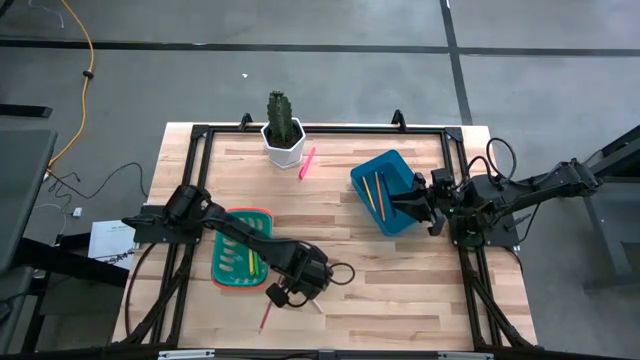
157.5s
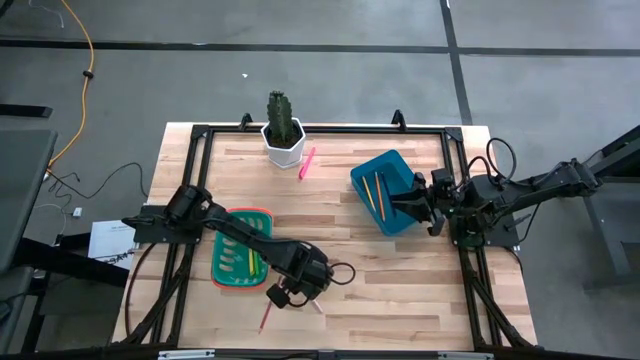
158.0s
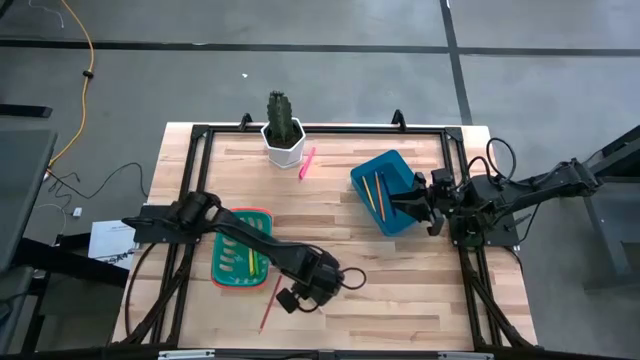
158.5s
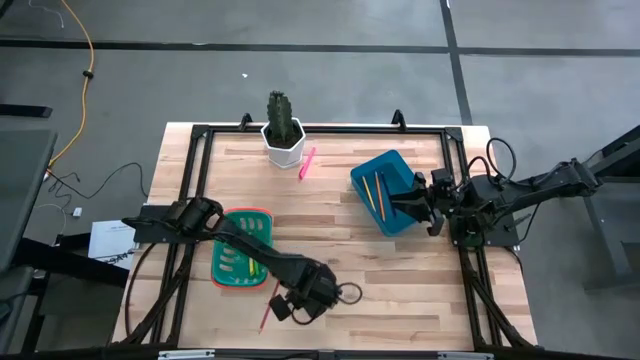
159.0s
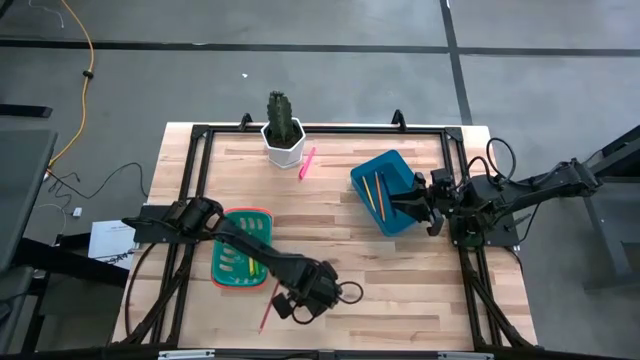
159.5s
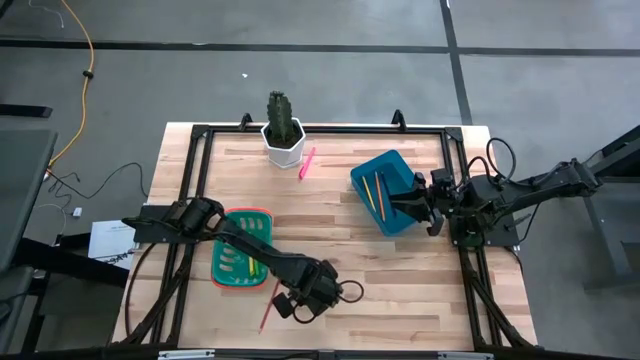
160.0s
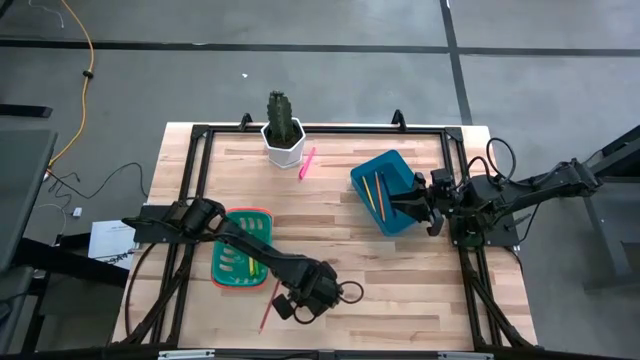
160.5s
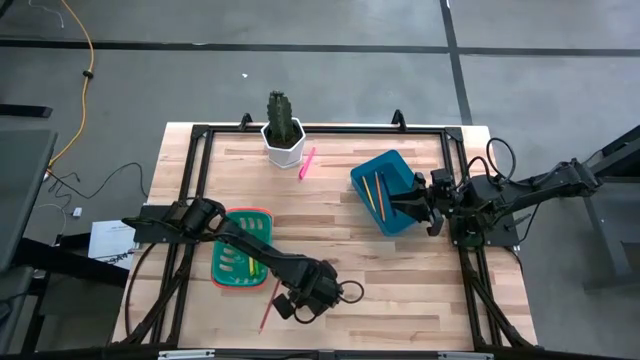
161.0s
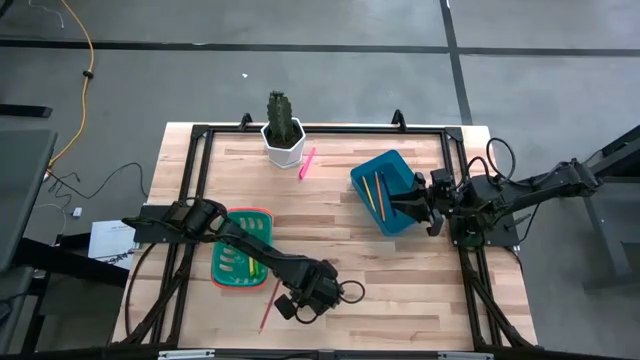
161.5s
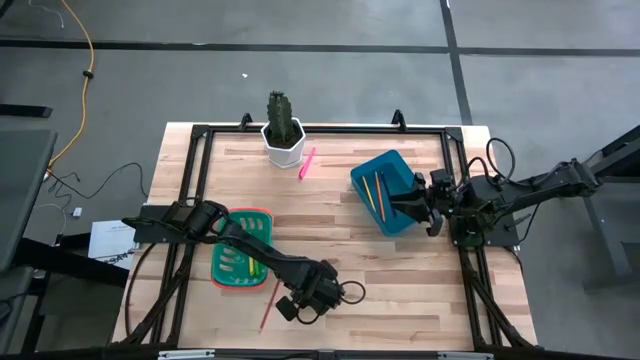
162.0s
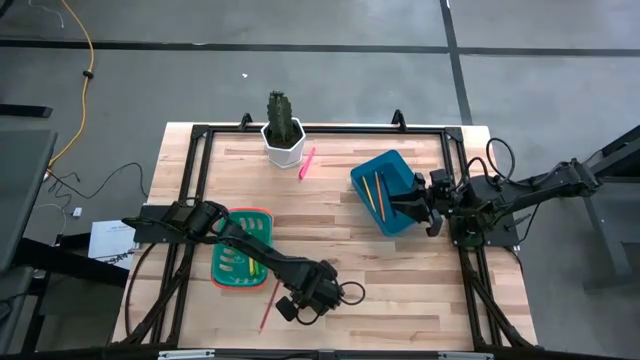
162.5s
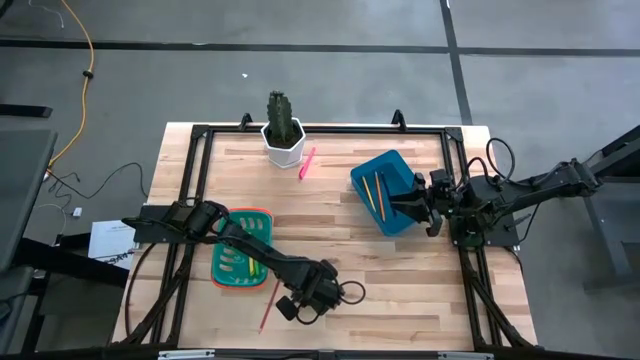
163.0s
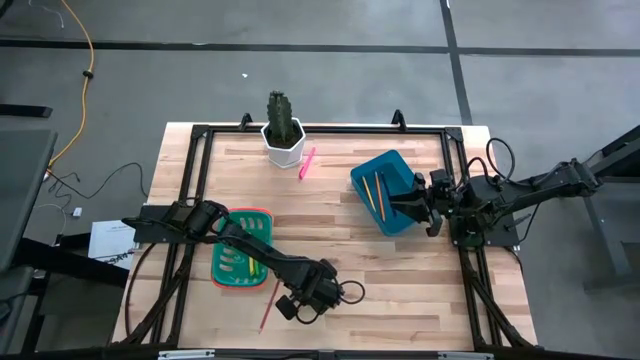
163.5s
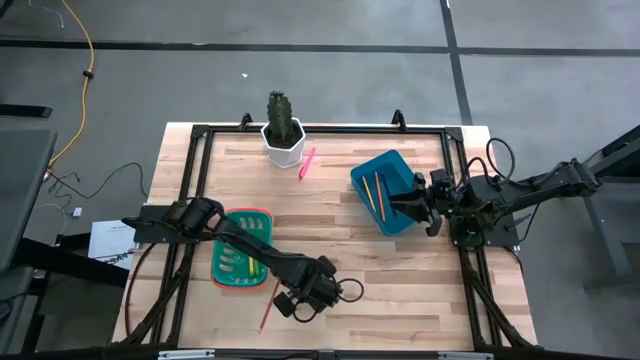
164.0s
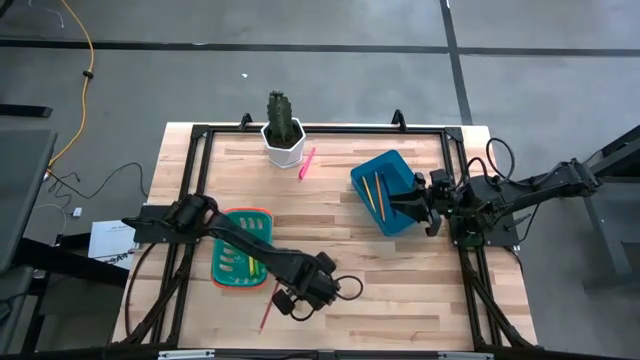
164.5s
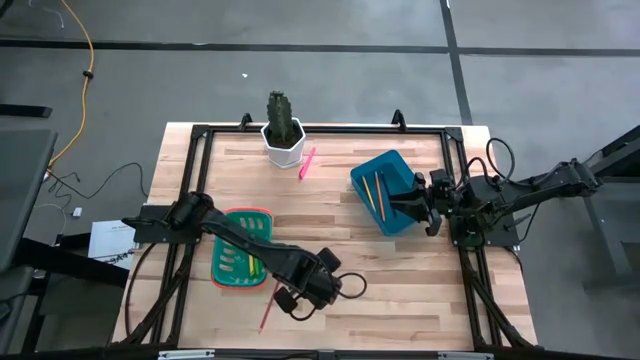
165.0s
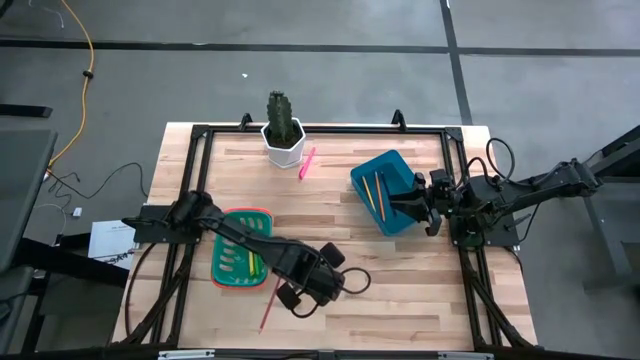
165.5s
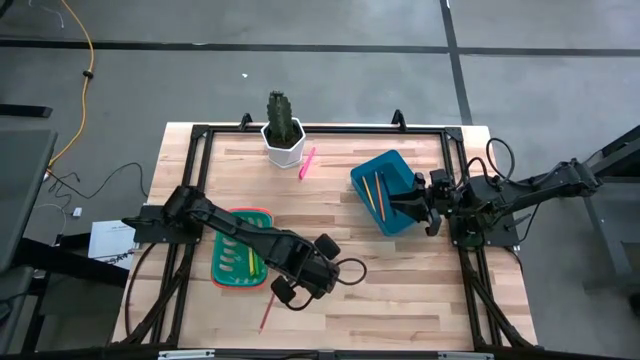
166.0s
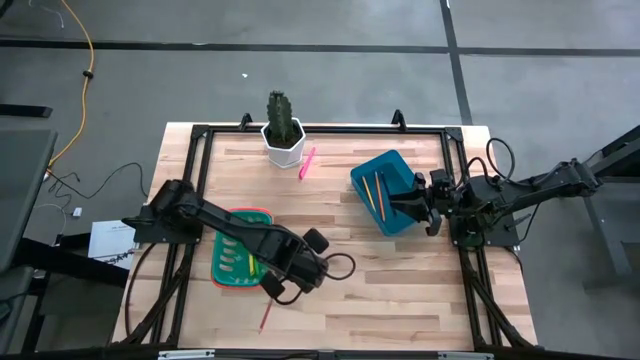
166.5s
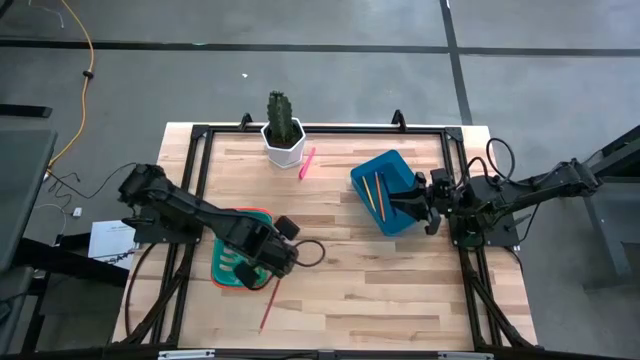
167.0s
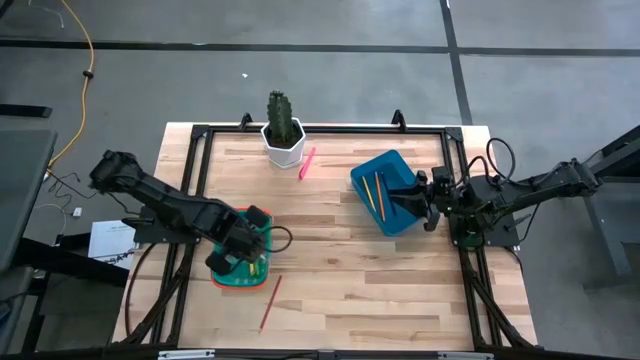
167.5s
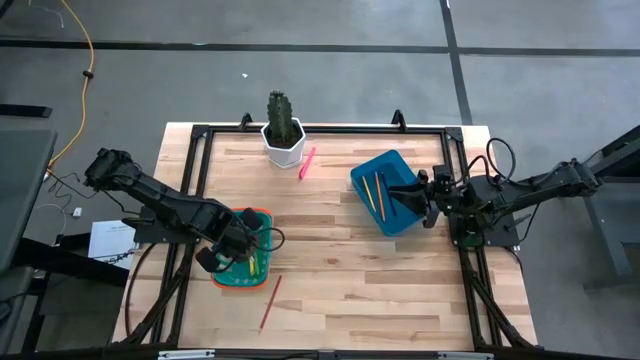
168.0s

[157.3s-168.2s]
Task: Sort pens & pencils
Put the light pink pen into the green basket

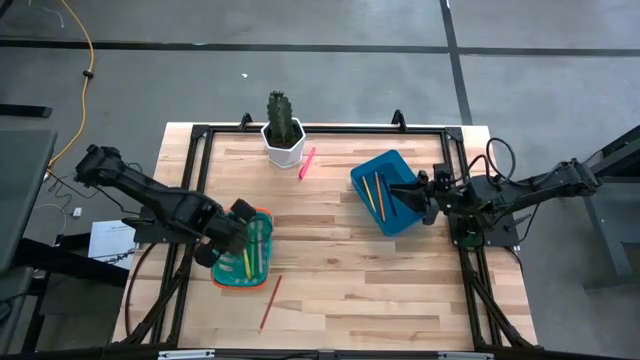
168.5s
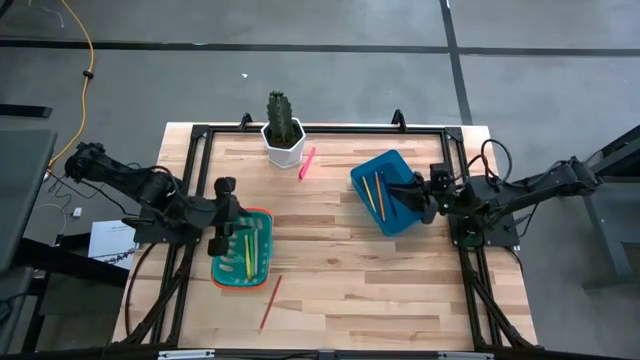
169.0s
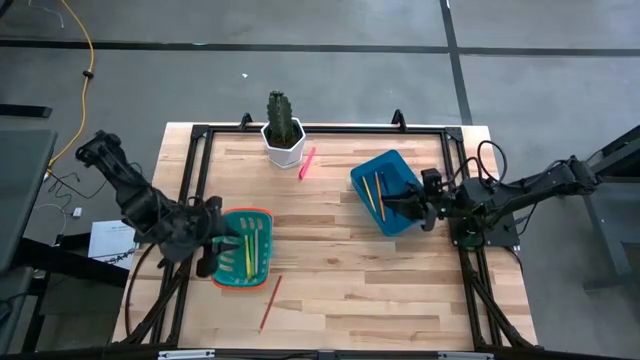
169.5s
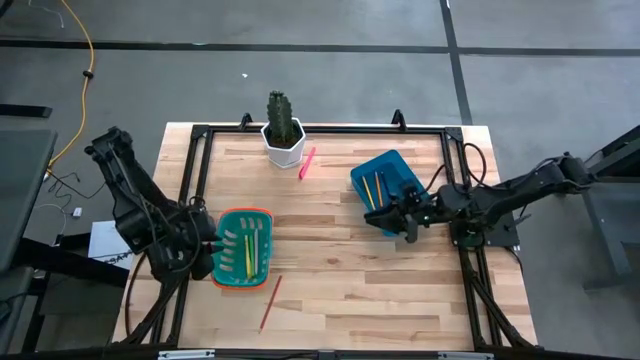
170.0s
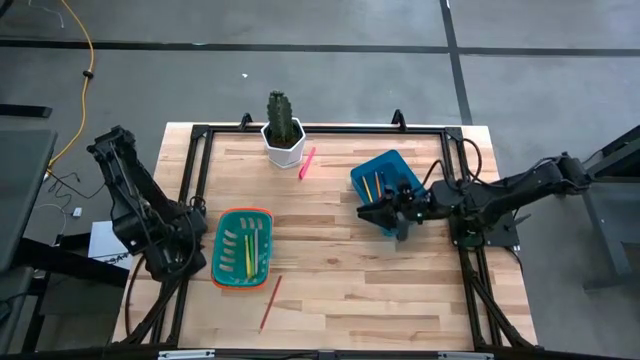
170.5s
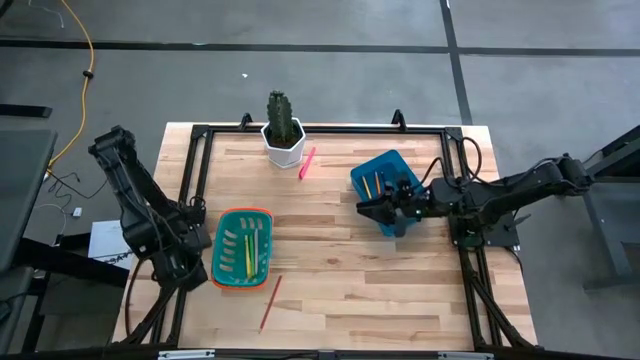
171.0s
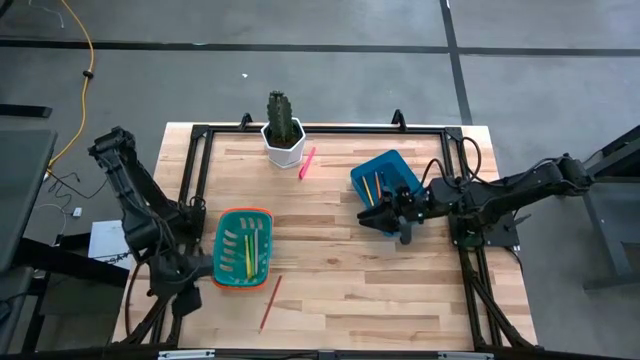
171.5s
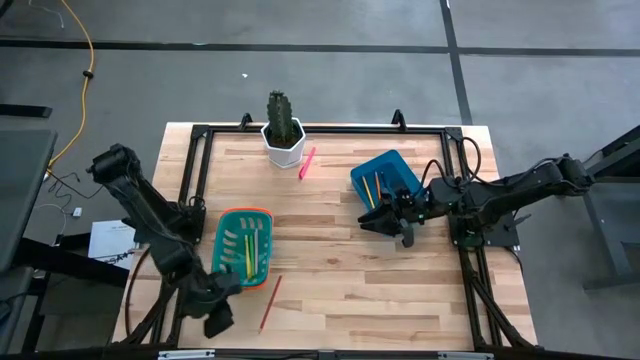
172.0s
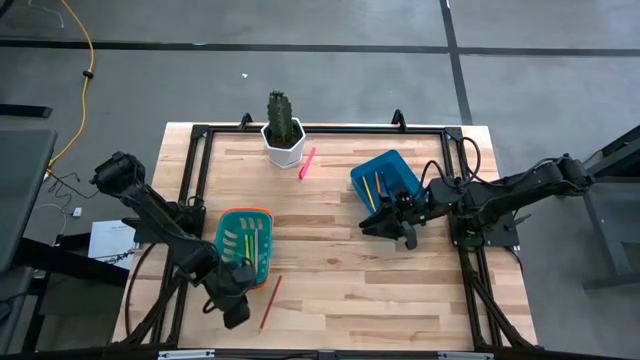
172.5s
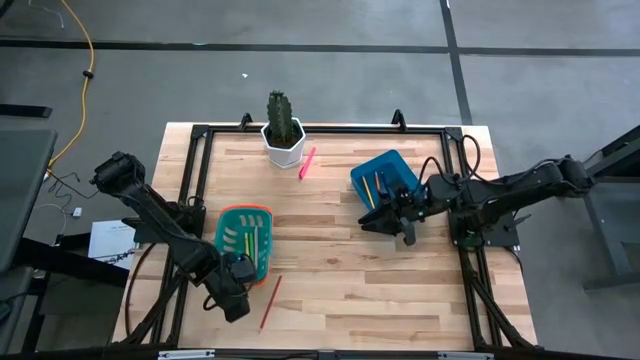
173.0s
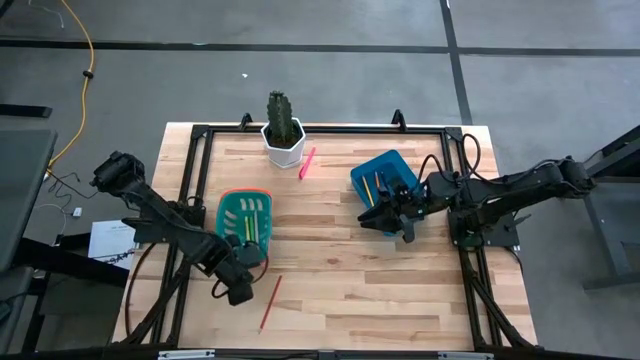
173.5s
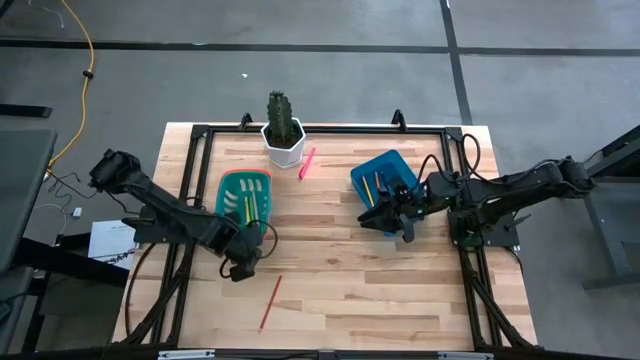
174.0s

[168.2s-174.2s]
Adjust the green basket on the table
